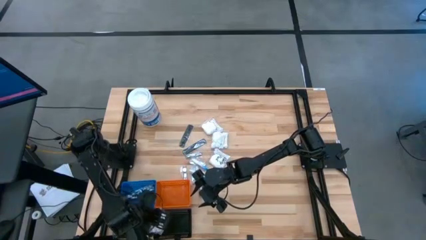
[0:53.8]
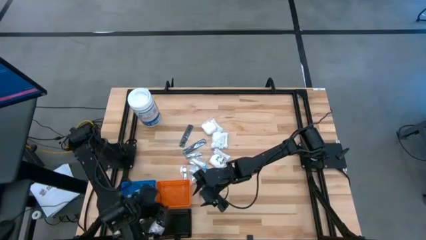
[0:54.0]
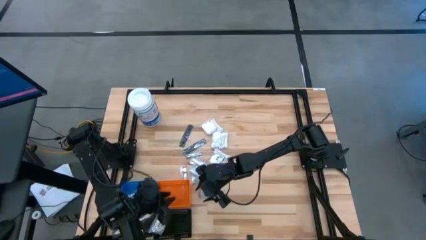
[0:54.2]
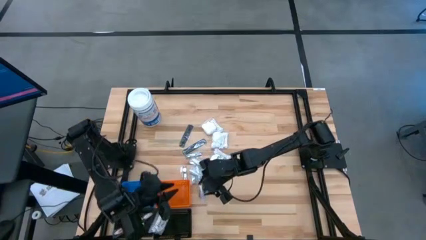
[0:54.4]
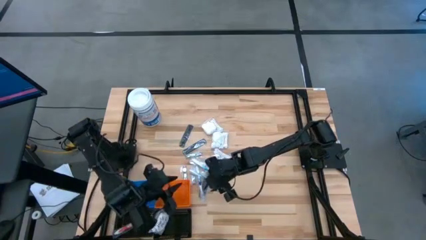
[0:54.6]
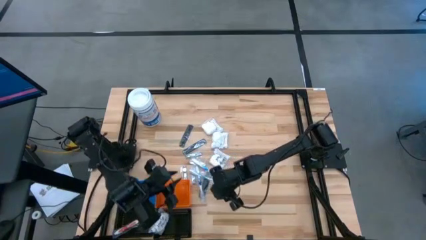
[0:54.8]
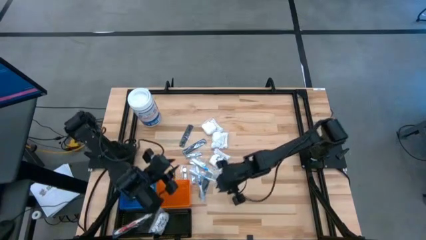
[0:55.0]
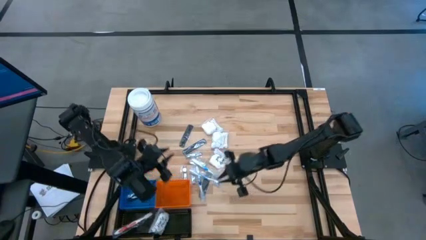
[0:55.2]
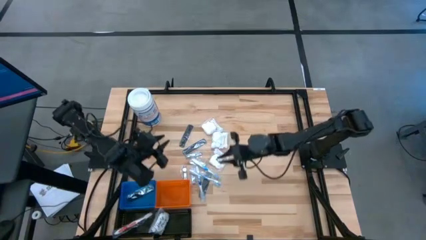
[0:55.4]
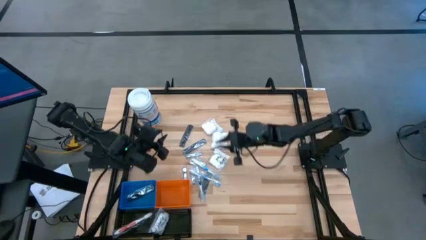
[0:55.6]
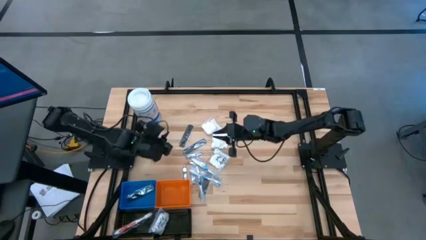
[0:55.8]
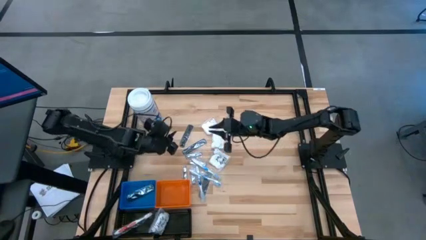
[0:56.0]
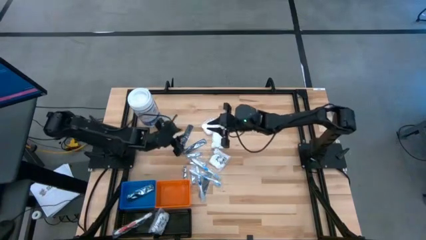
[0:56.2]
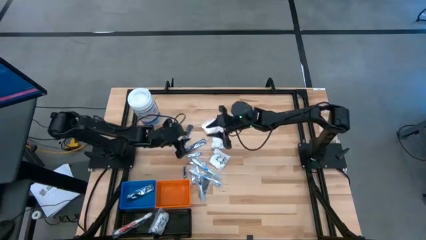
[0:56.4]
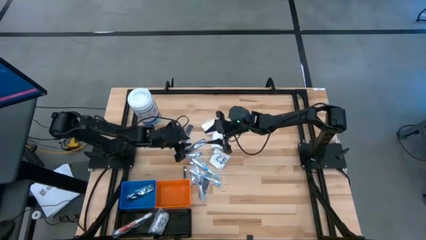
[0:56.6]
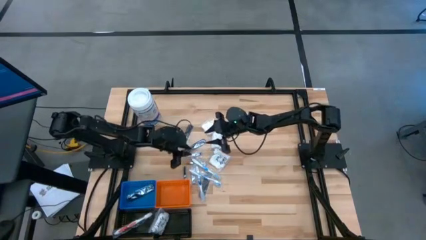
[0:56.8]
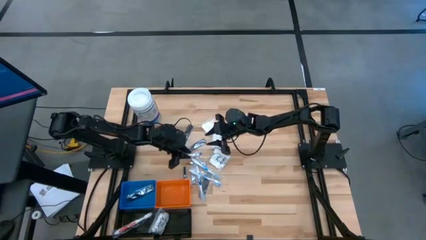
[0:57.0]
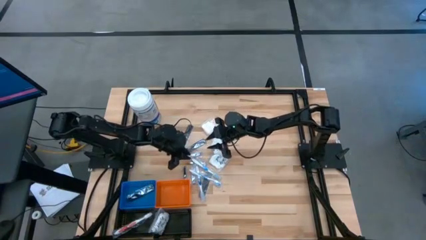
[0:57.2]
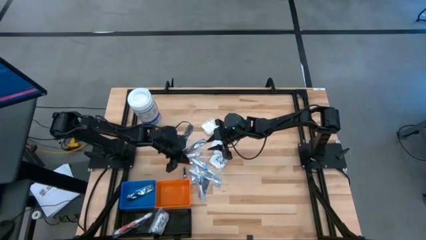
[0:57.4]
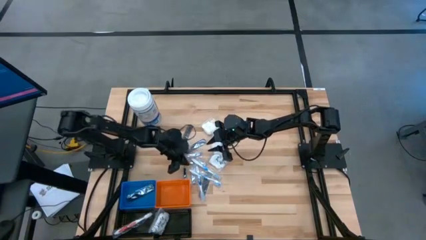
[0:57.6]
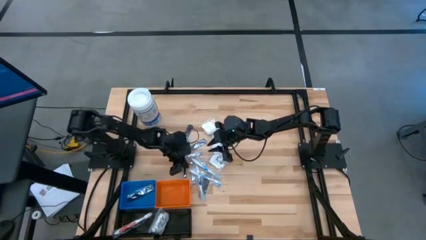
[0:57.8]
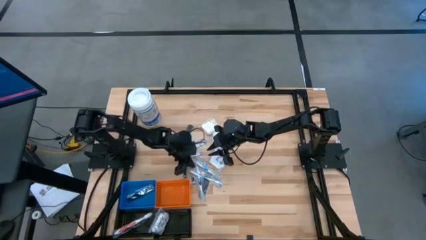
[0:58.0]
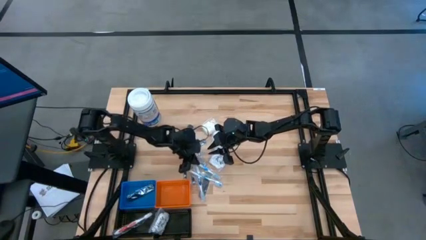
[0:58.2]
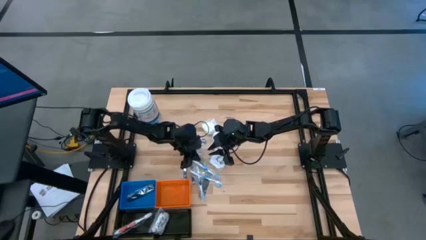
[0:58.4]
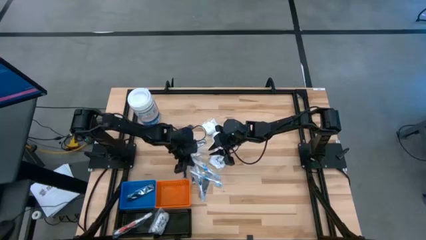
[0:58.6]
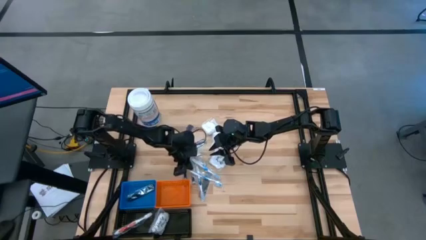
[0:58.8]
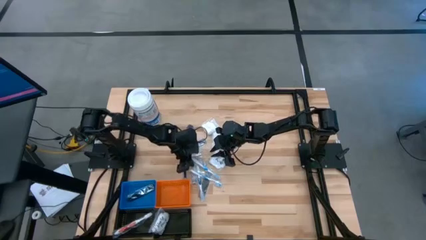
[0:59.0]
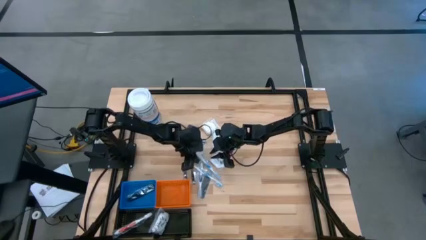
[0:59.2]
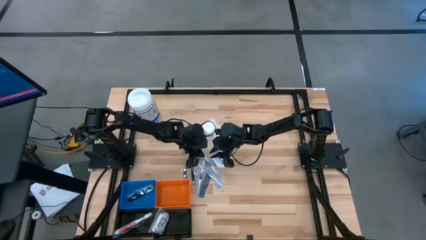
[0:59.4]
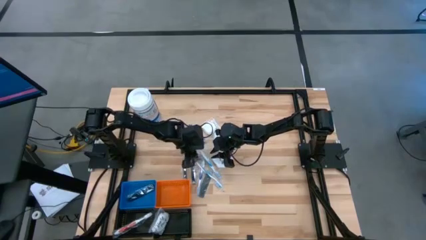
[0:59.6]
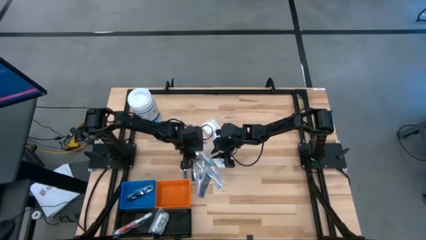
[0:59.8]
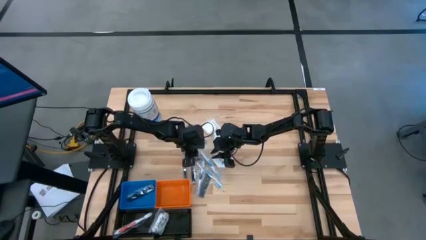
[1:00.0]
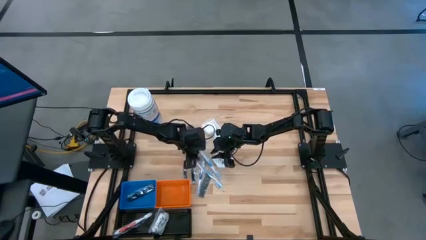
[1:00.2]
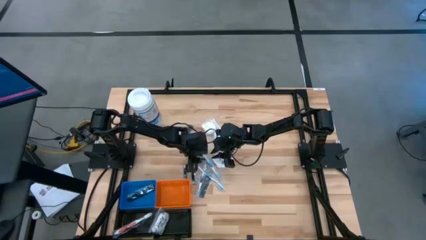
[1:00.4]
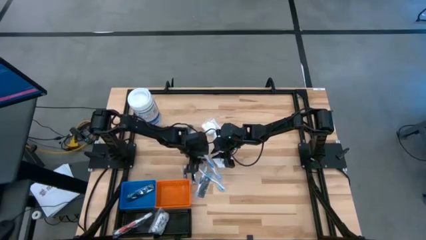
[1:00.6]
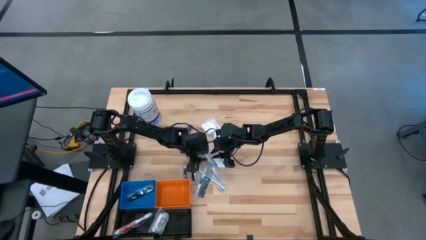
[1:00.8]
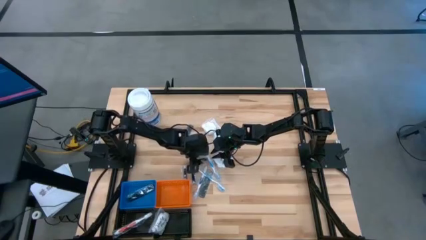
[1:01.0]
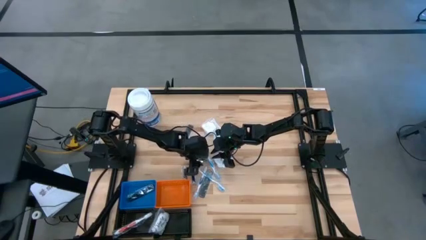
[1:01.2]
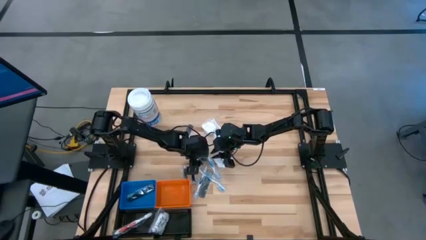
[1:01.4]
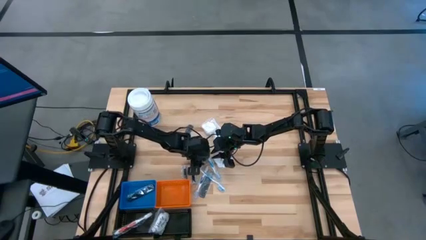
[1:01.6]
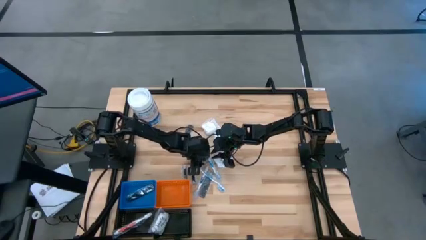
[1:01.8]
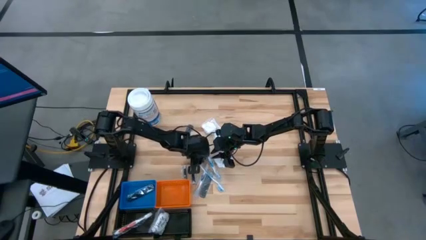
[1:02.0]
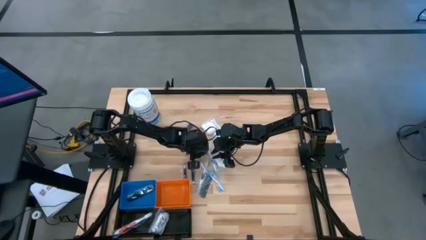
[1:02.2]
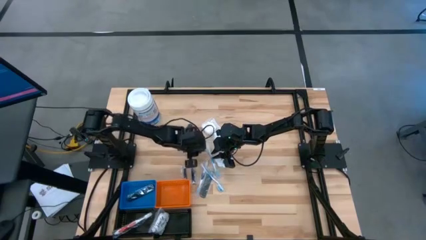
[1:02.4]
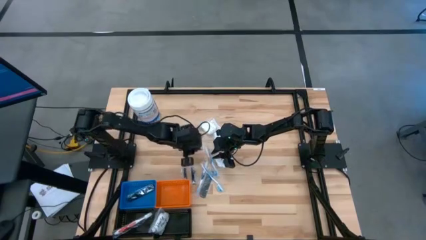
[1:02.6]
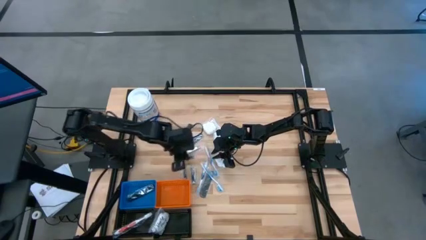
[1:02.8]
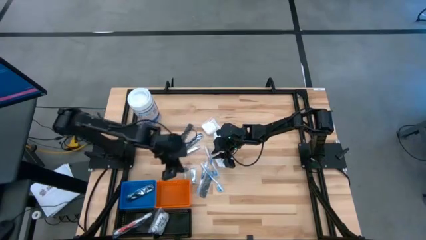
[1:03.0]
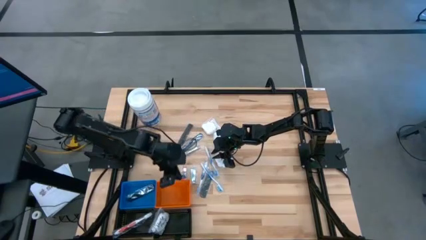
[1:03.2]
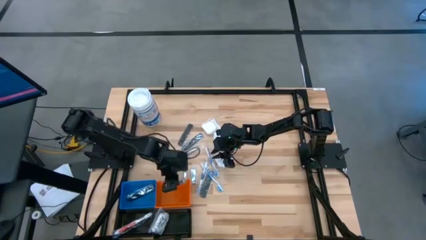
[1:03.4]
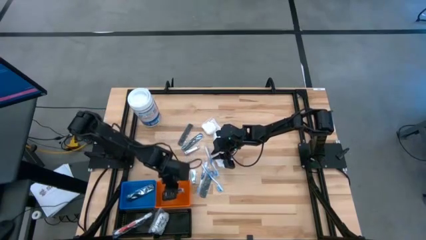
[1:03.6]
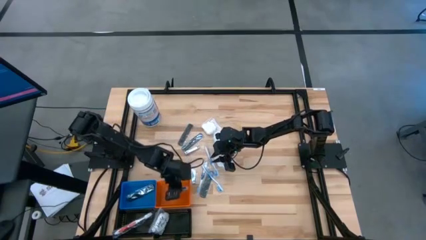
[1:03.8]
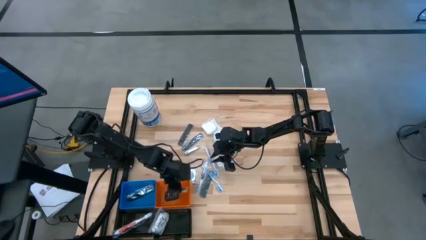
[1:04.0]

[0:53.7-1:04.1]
Task: Pick & Place Travel size toiletries
Put the top left nail cutter into the orange basket

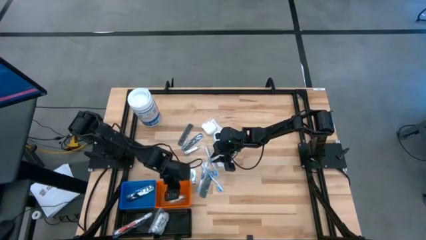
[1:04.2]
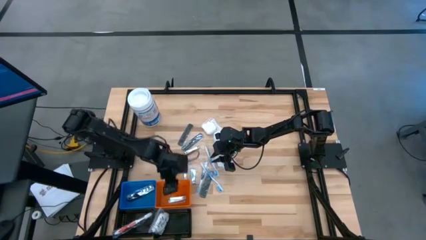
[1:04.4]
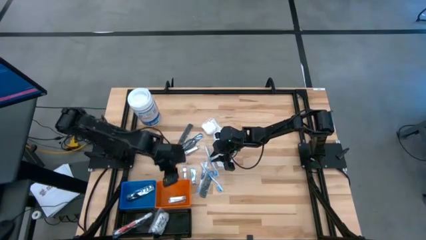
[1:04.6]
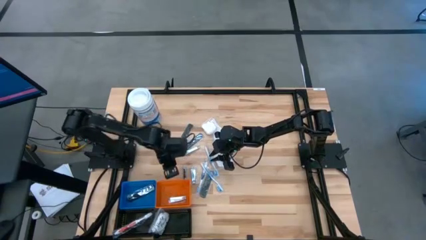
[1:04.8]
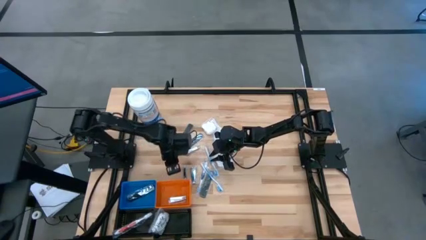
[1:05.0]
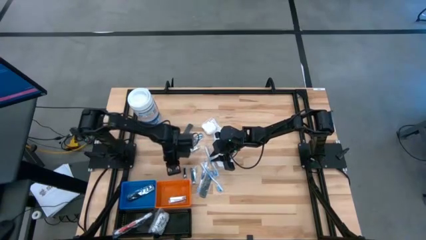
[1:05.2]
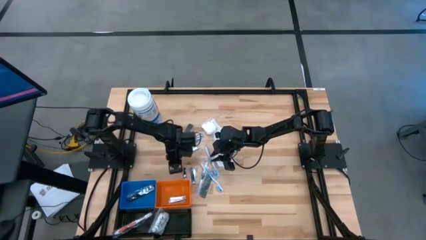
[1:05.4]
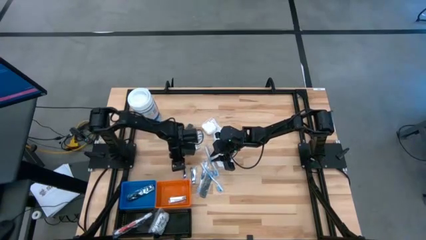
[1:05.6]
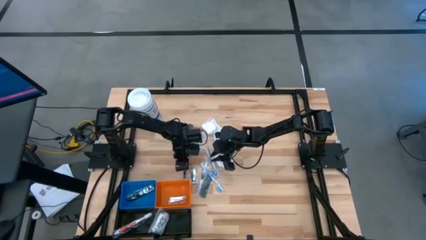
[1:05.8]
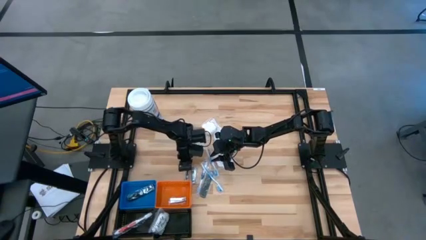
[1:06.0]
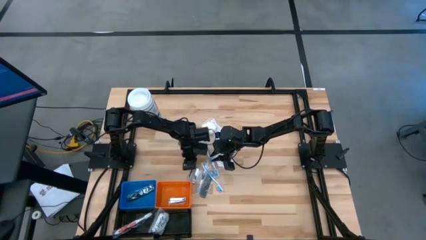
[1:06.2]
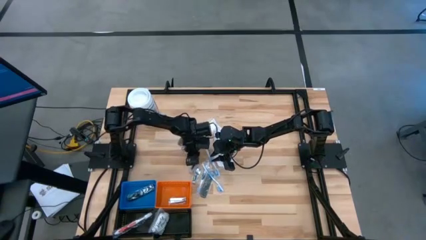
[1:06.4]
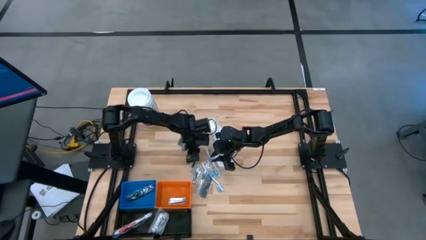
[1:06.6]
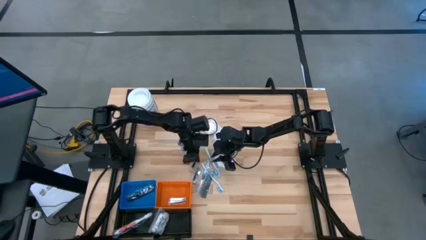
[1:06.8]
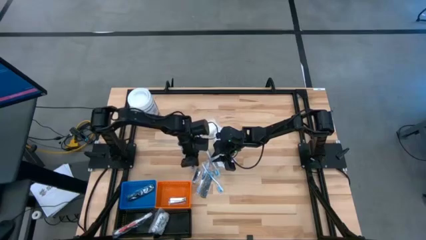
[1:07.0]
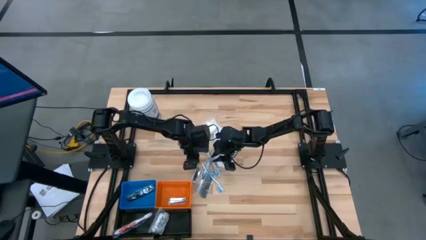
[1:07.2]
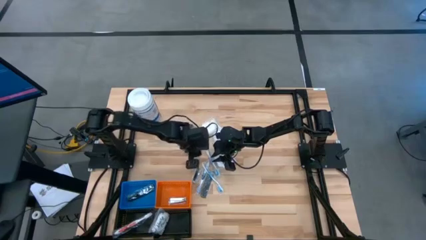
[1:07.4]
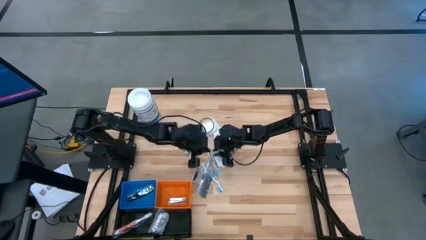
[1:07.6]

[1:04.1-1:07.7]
Move the bottom left nail cutter in between the top and bottom nail cutter

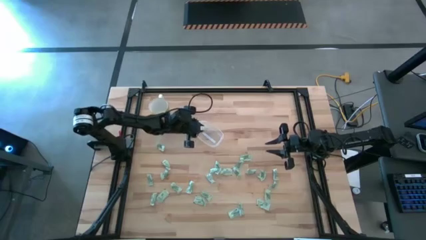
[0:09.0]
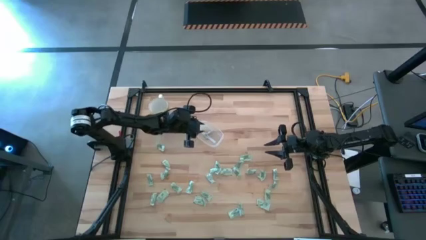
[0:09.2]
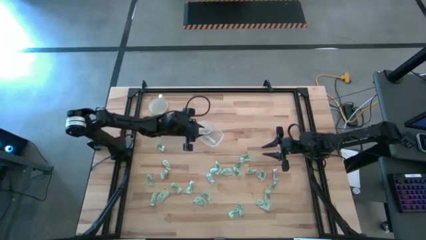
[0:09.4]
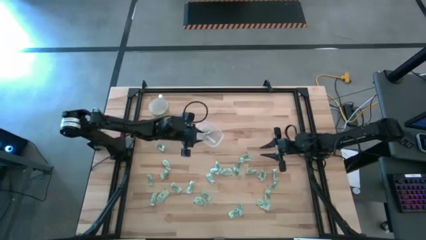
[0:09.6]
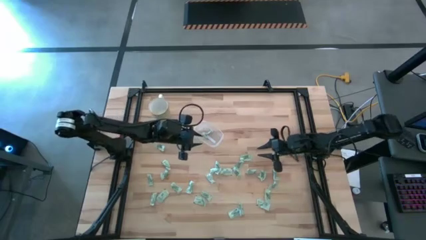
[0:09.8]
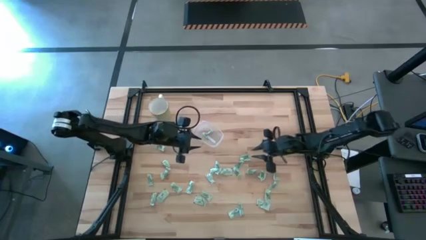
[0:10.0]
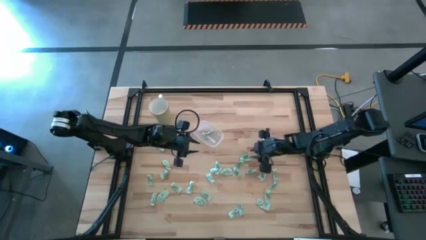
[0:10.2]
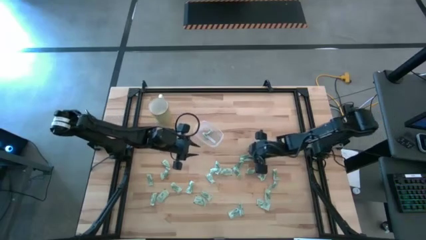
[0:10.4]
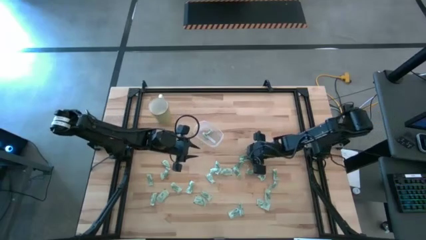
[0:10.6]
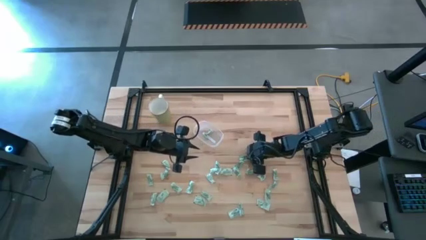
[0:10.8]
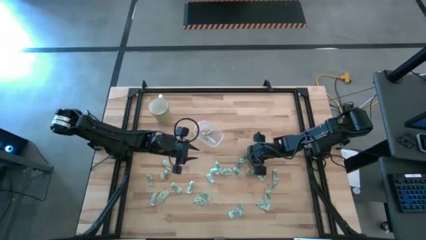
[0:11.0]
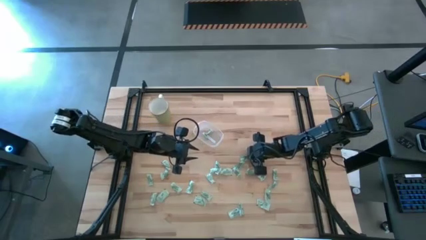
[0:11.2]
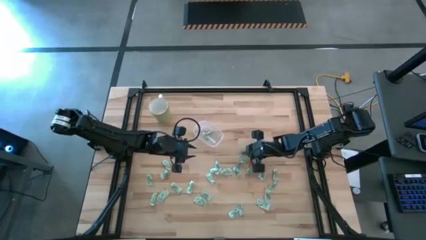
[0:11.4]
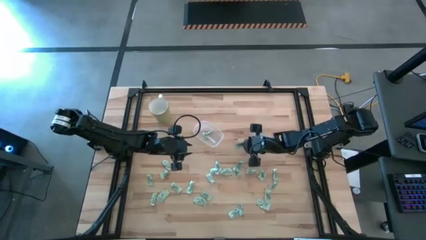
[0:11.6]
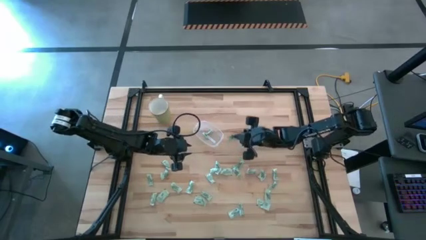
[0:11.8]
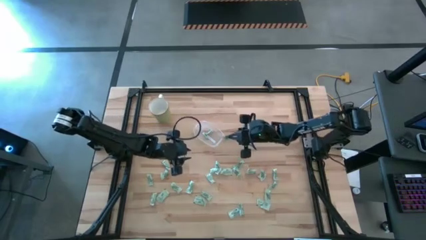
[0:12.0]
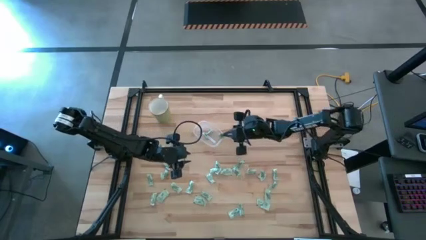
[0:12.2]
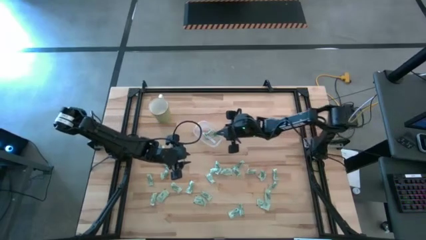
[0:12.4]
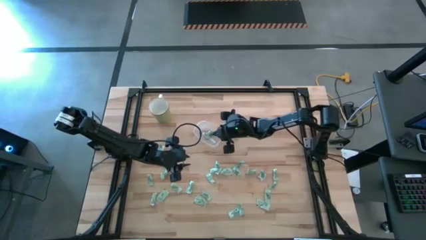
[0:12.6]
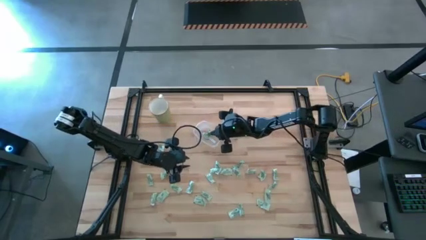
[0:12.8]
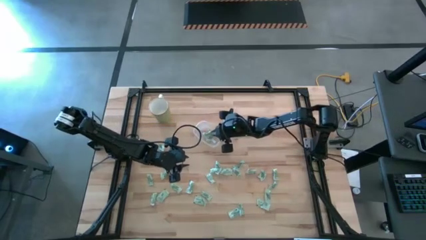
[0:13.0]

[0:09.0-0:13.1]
Task: Pick and place Stevia / Truvia into bins
Put the stevia packet into the transparent container
